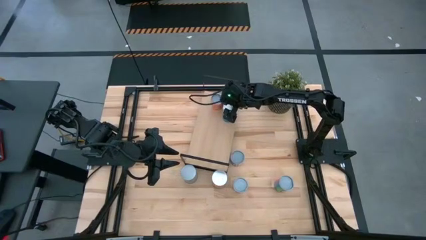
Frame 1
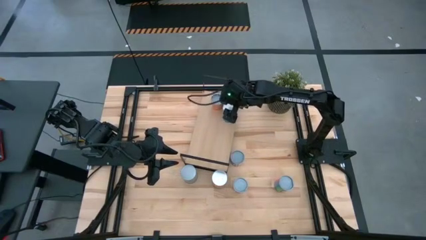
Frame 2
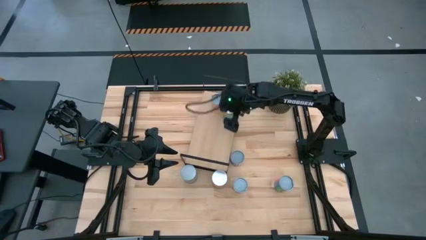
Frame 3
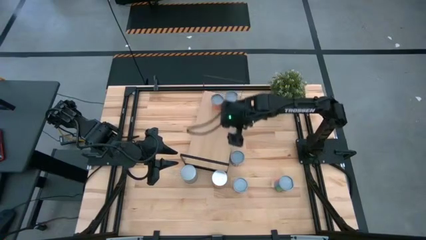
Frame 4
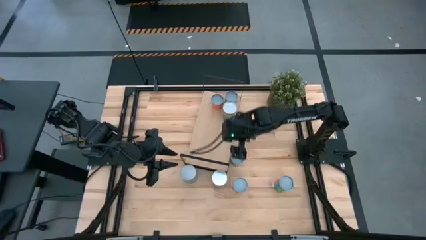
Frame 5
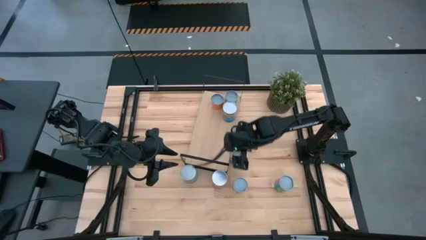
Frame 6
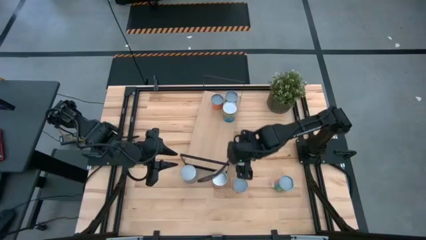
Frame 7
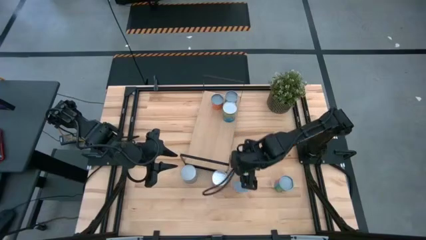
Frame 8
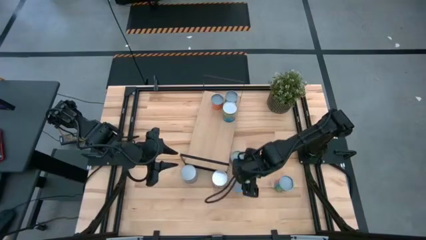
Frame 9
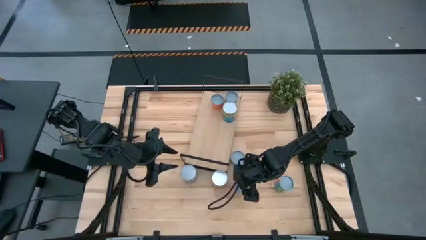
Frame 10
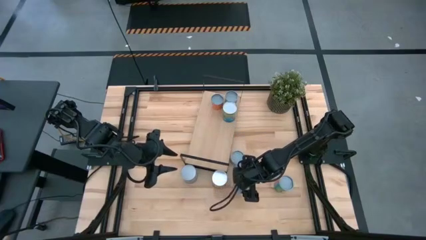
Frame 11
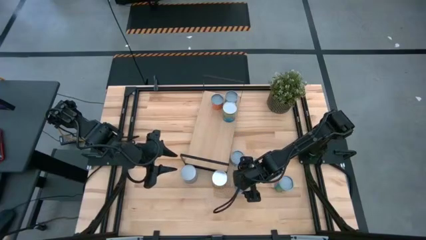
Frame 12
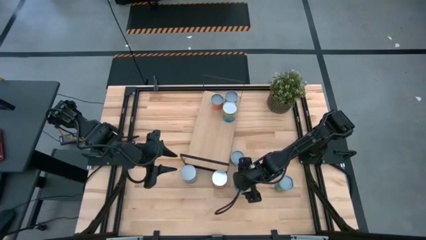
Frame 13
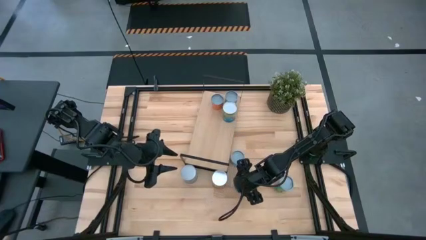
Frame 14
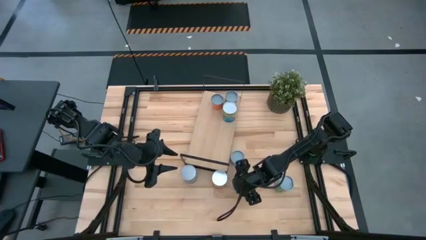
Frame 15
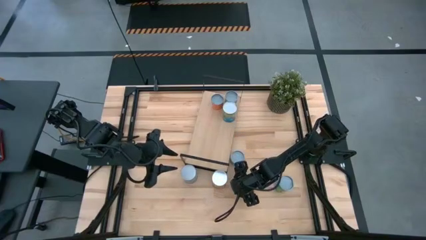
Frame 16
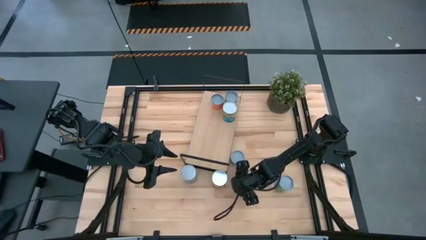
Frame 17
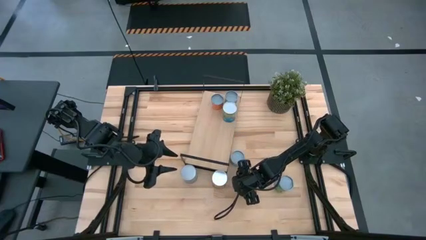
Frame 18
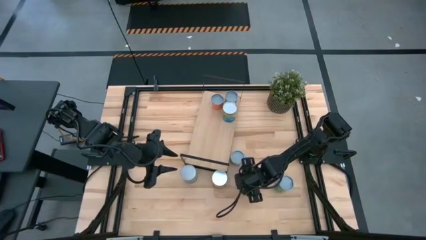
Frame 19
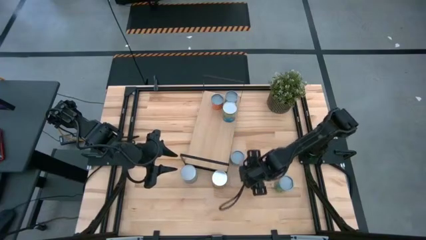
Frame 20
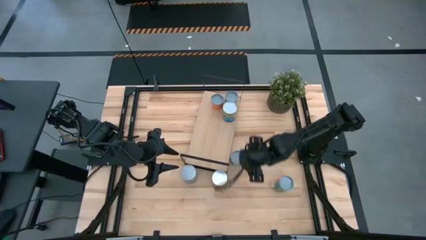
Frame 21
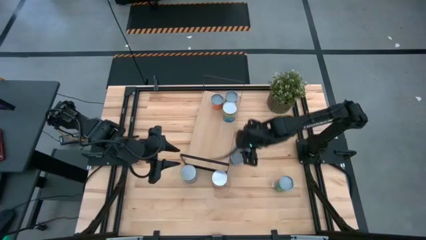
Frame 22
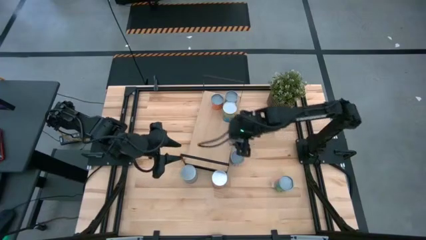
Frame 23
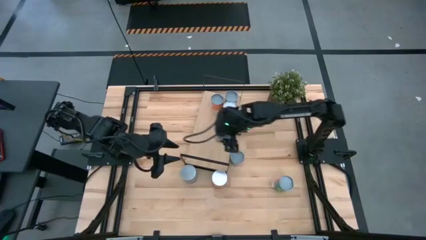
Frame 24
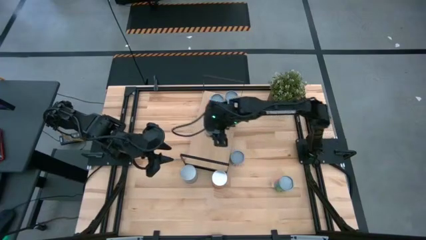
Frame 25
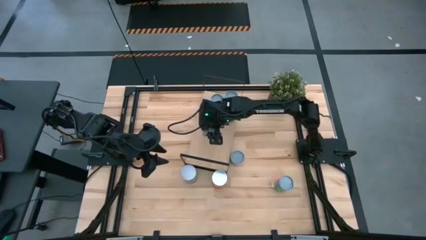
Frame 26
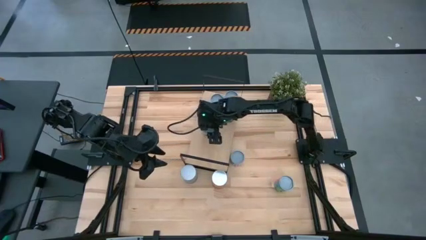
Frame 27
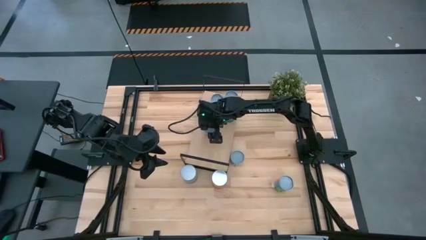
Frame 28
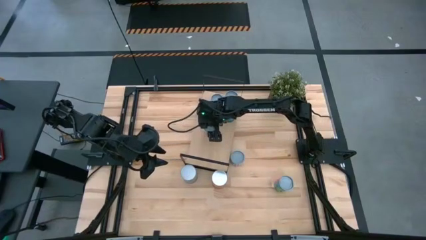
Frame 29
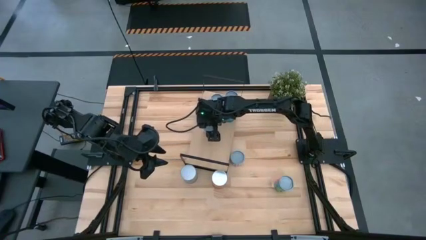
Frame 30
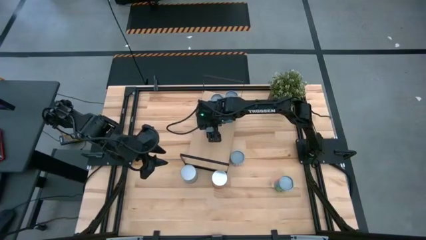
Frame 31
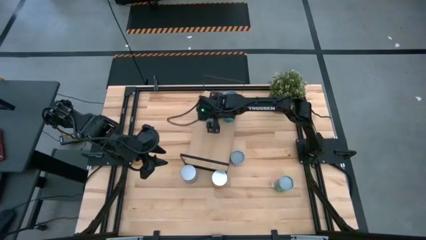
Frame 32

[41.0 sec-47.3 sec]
Task: Pick and place cans onto a shelf
Put the red can on the shelf aligned with the red can

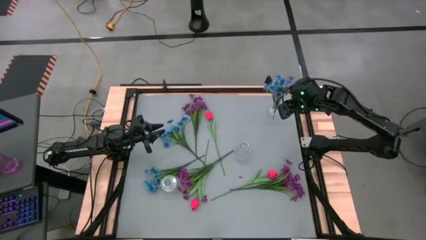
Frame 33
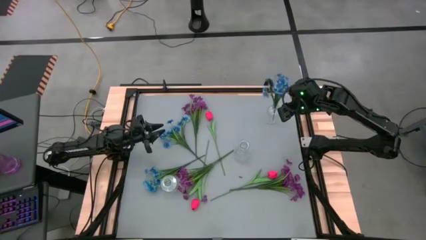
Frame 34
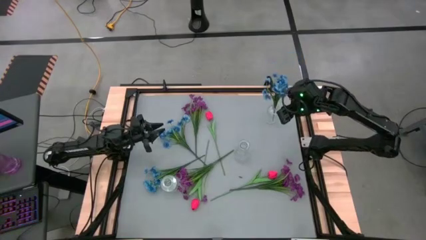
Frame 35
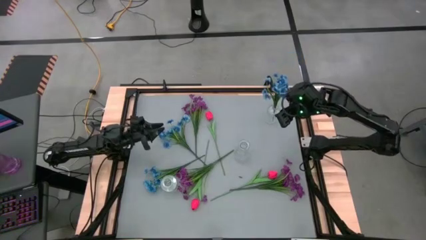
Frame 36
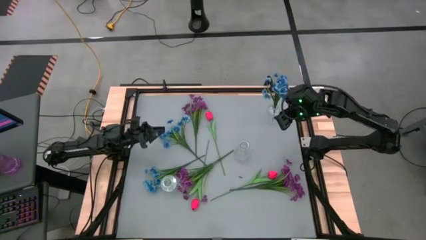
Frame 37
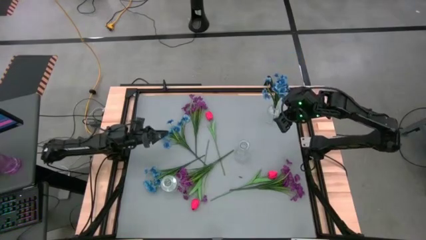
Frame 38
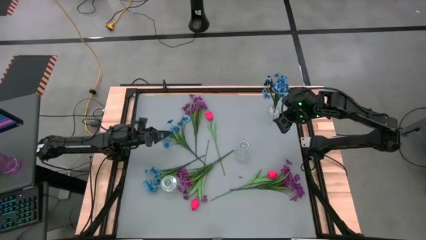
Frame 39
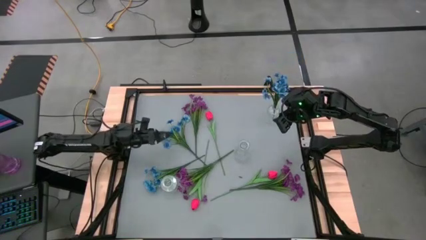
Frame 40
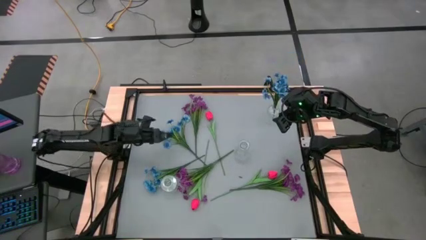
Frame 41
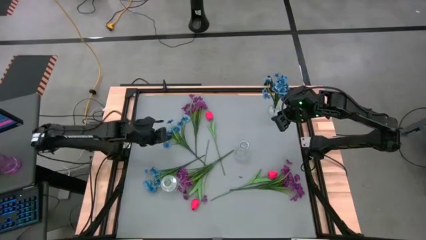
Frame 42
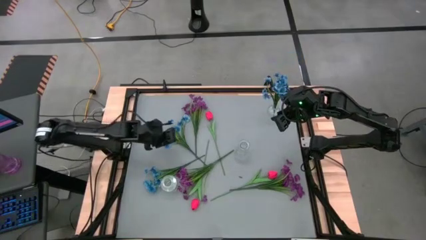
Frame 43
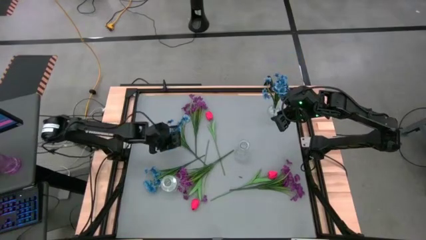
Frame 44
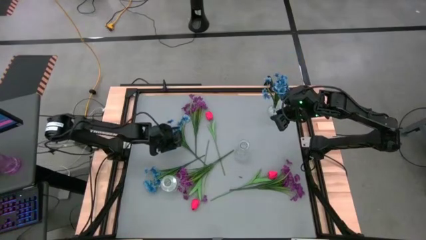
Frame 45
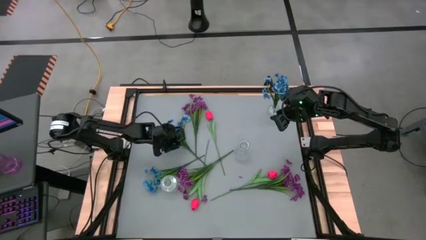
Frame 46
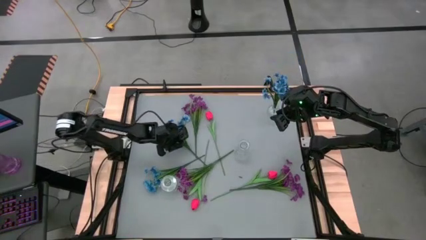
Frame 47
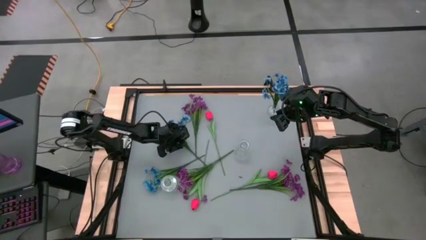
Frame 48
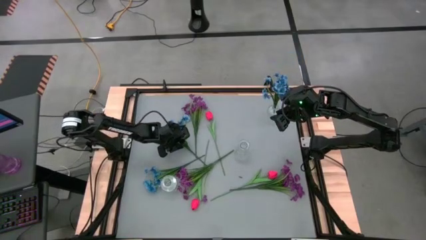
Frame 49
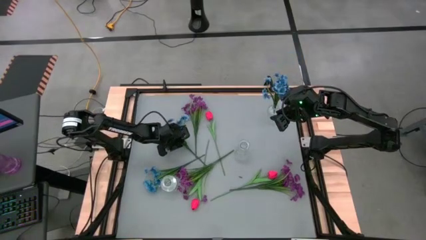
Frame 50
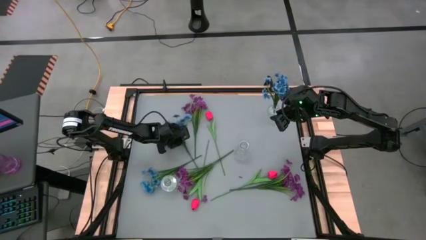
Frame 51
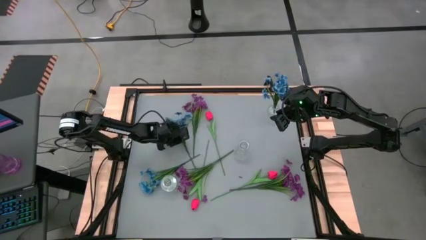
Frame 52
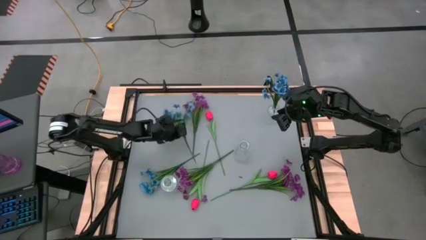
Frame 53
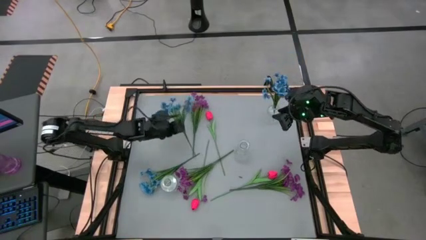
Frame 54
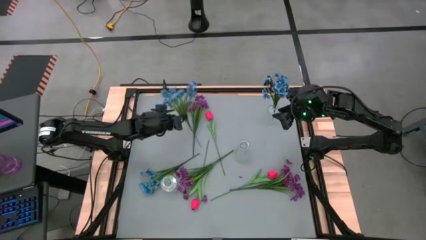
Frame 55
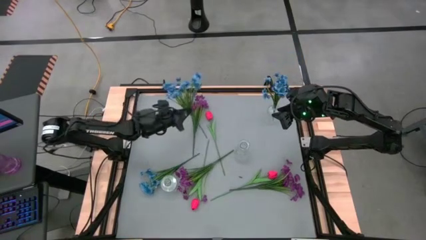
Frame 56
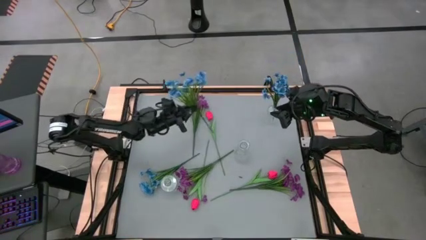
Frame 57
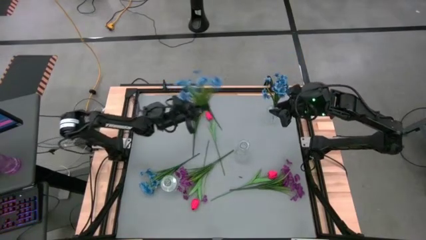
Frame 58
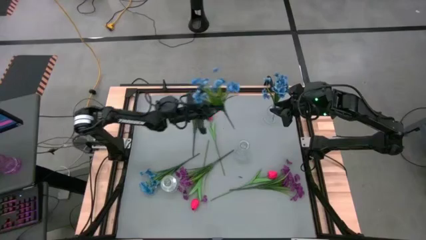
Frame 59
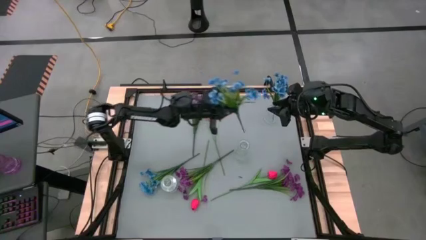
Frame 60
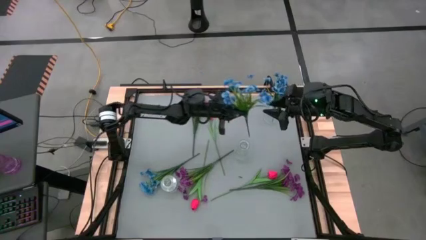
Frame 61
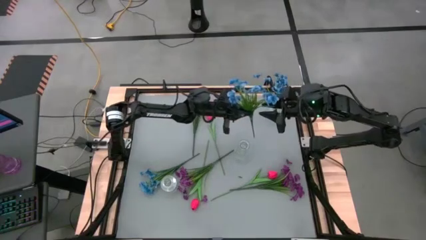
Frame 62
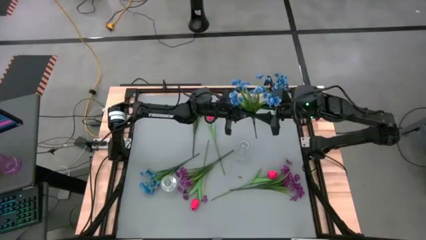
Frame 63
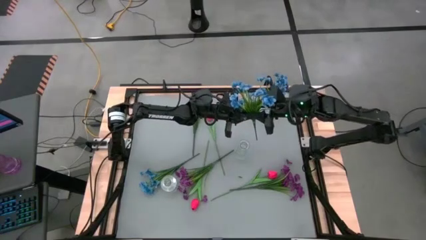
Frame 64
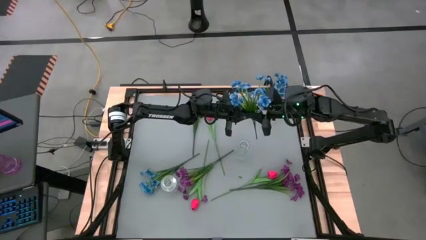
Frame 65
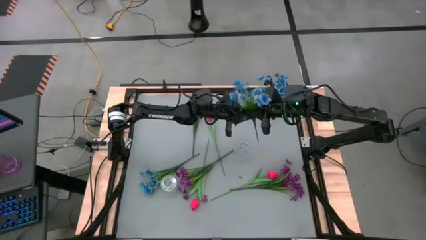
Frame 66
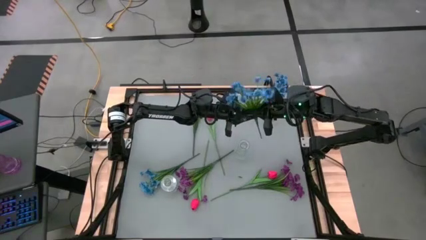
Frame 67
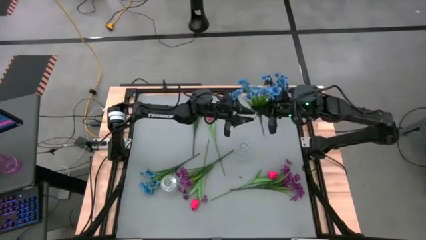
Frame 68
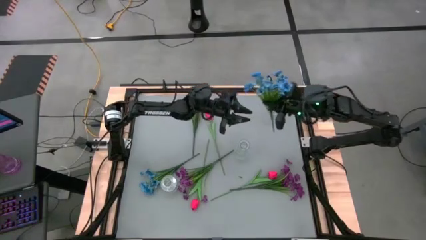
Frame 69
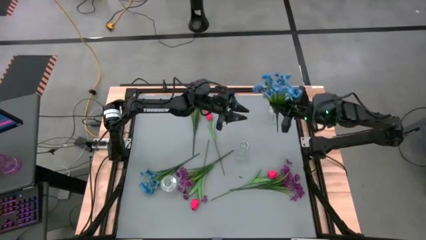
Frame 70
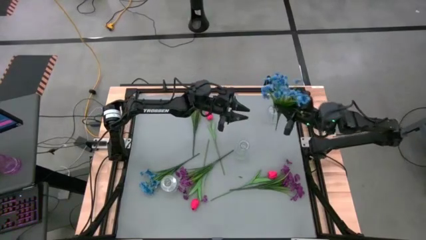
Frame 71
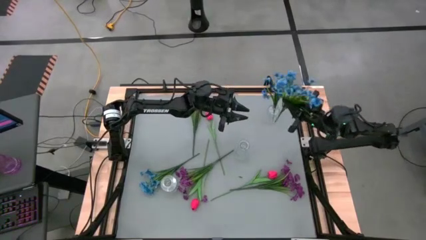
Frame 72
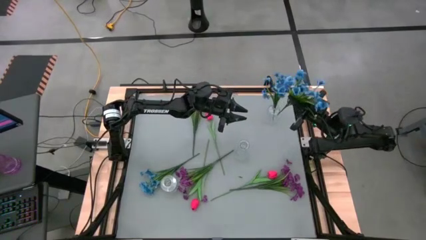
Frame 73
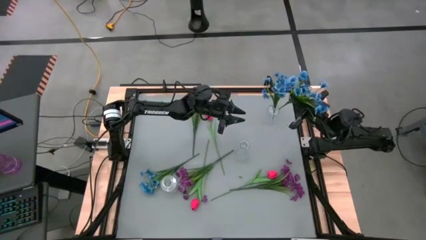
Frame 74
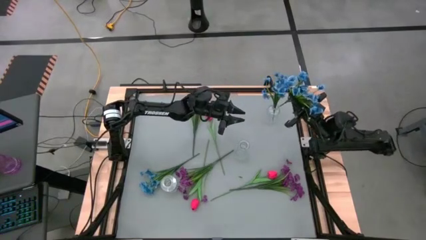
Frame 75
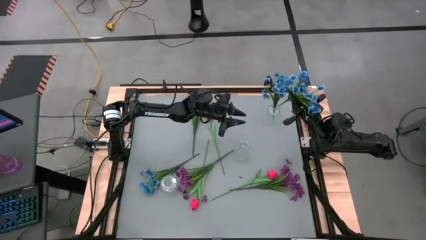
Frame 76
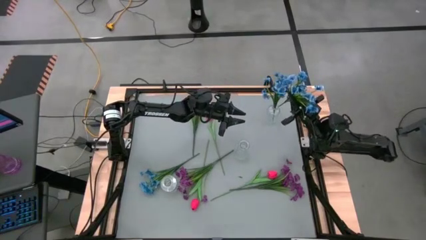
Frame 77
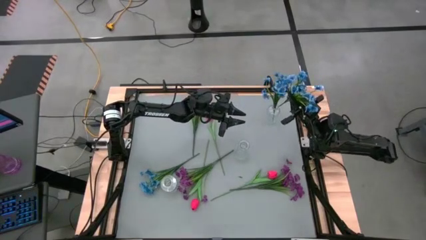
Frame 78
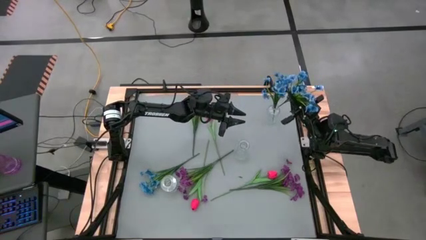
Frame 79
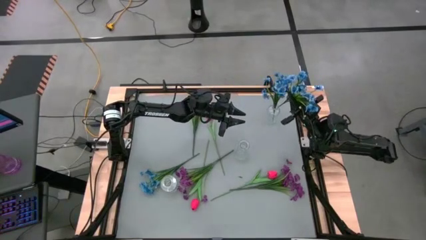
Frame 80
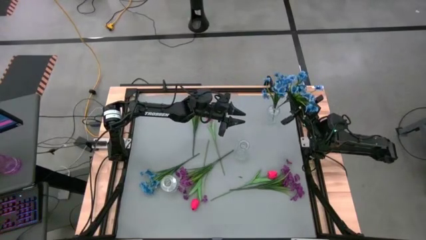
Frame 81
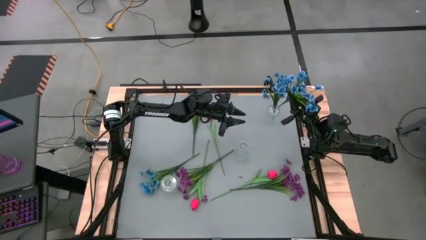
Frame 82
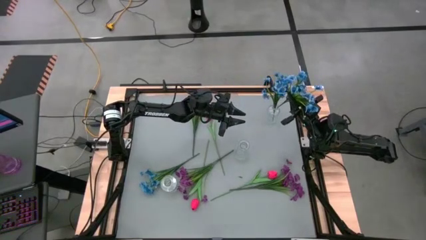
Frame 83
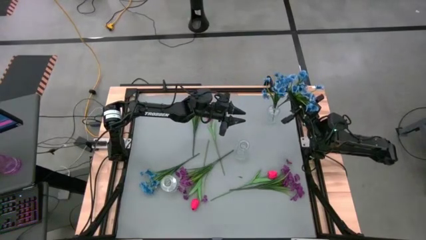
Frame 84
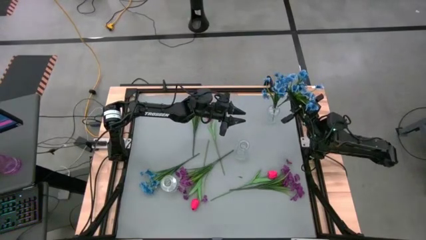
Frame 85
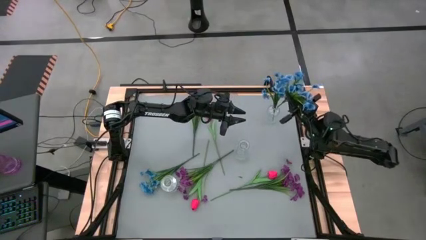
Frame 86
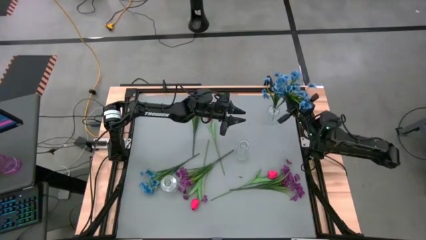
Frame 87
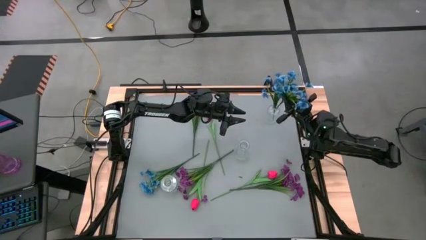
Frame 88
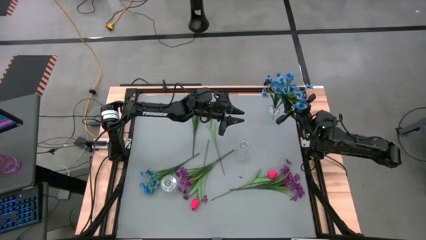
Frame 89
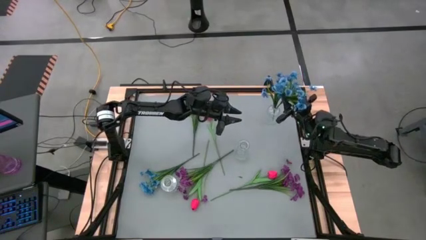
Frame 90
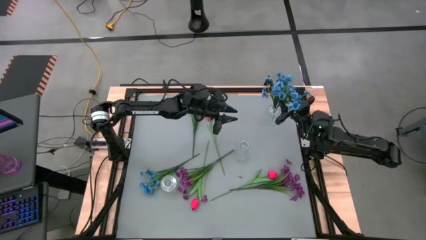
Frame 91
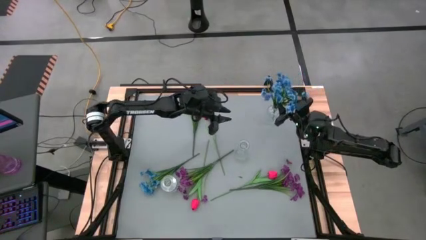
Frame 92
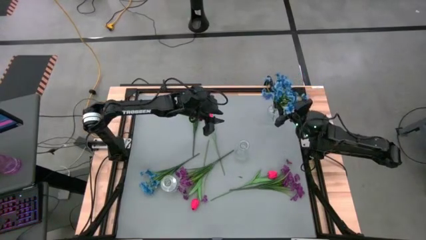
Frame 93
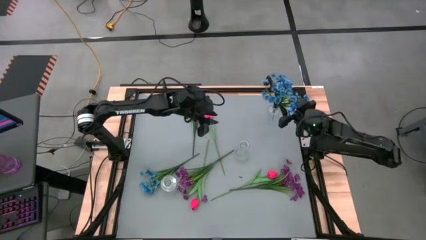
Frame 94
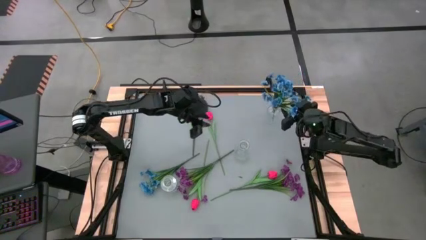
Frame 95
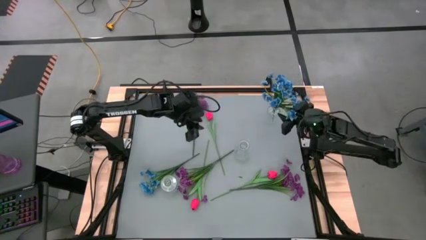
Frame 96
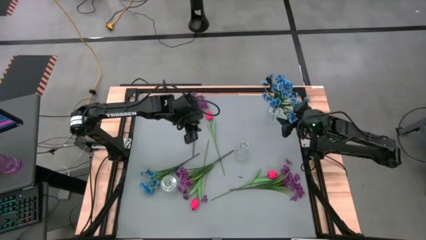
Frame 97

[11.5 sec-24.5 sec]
Task: Sort flowers into vase by color
Put the top blue flowers into the top transparent vase
